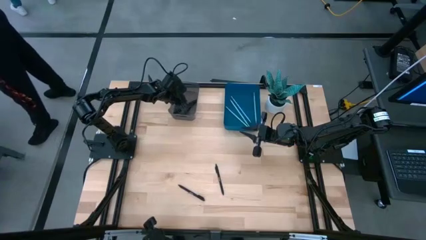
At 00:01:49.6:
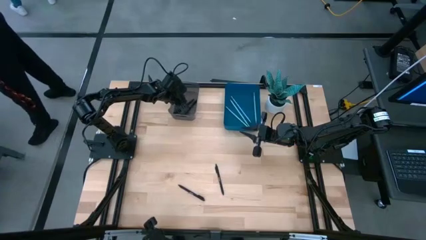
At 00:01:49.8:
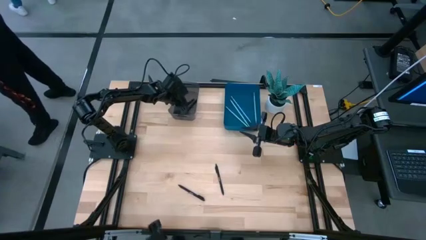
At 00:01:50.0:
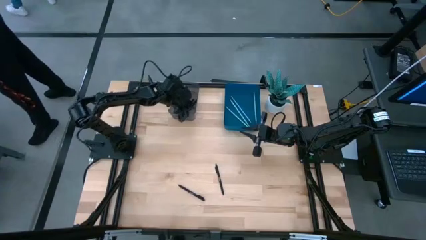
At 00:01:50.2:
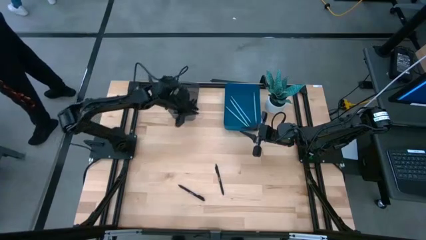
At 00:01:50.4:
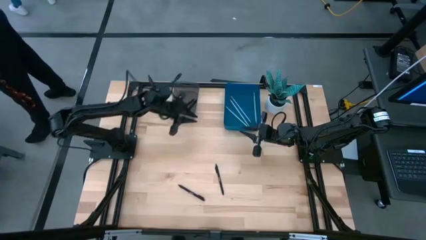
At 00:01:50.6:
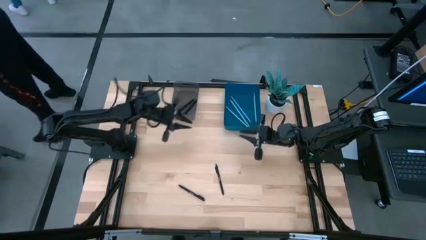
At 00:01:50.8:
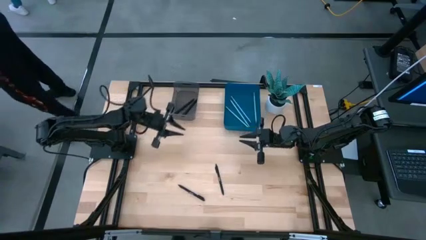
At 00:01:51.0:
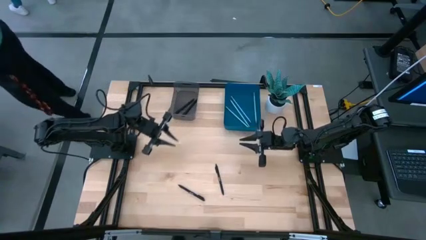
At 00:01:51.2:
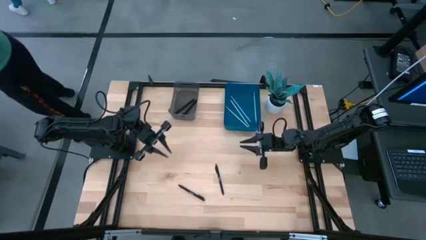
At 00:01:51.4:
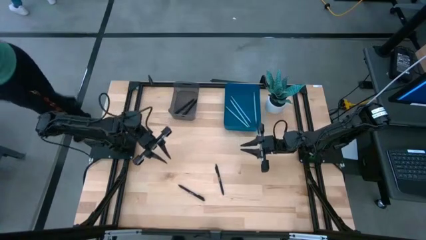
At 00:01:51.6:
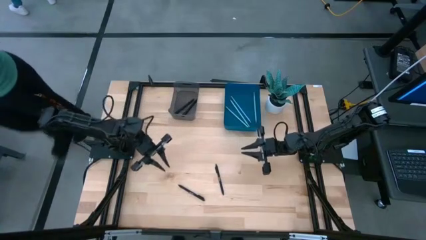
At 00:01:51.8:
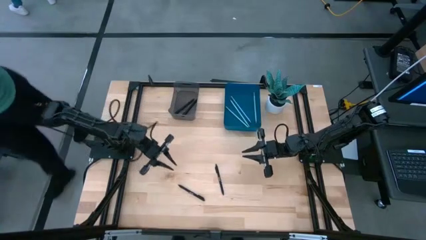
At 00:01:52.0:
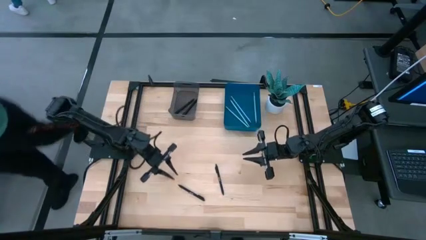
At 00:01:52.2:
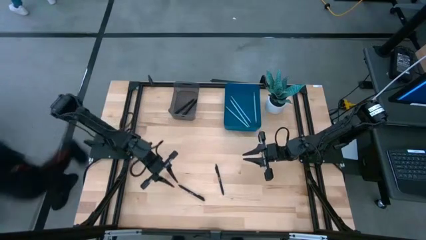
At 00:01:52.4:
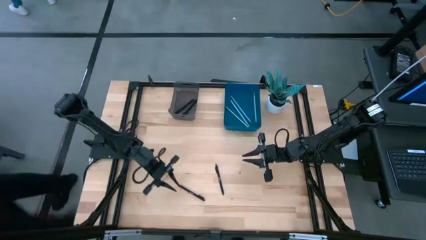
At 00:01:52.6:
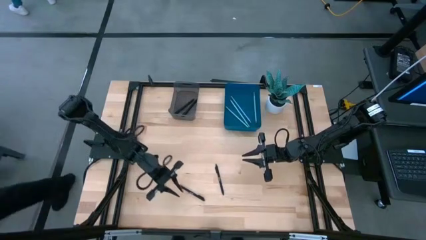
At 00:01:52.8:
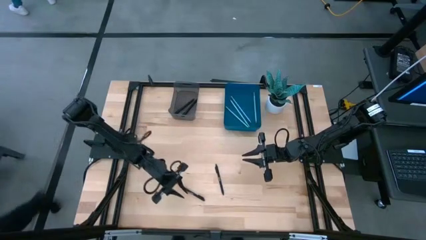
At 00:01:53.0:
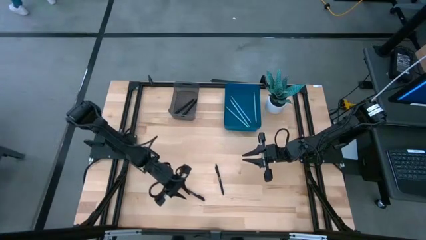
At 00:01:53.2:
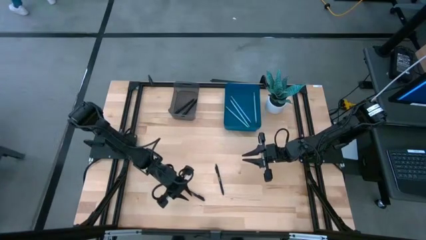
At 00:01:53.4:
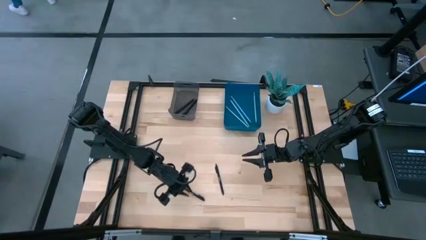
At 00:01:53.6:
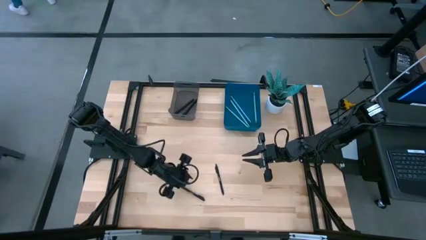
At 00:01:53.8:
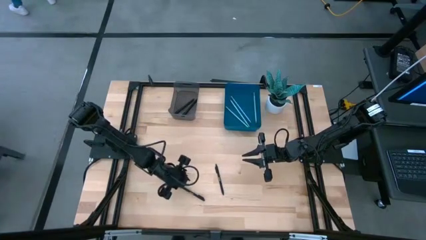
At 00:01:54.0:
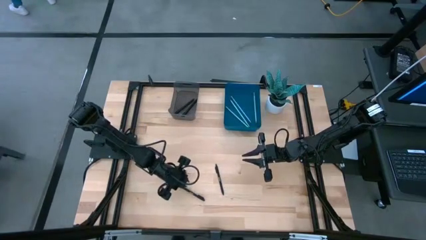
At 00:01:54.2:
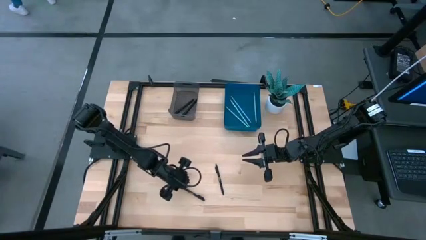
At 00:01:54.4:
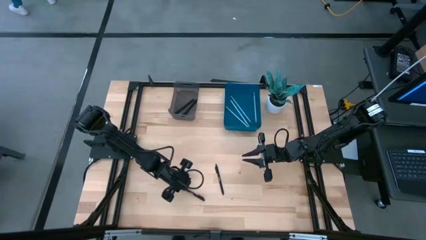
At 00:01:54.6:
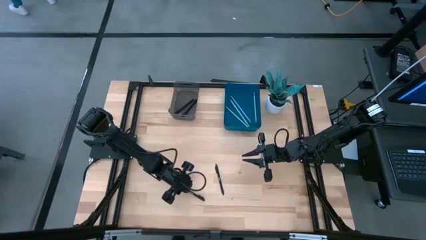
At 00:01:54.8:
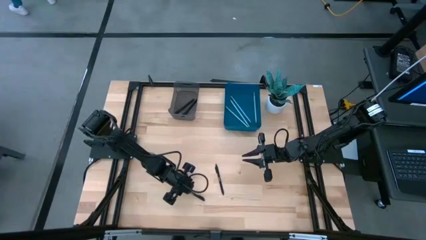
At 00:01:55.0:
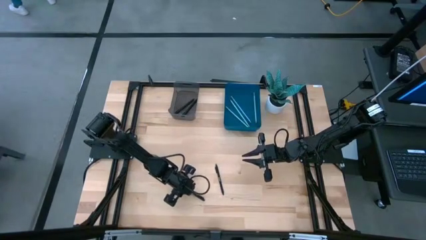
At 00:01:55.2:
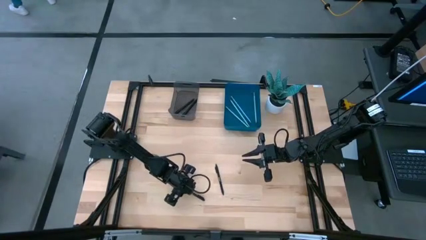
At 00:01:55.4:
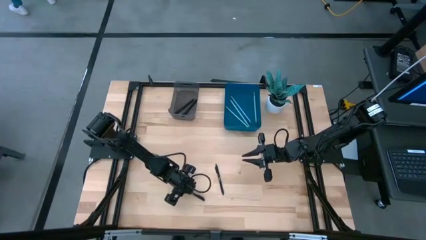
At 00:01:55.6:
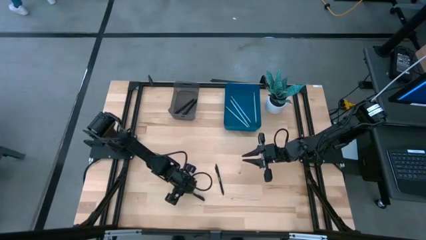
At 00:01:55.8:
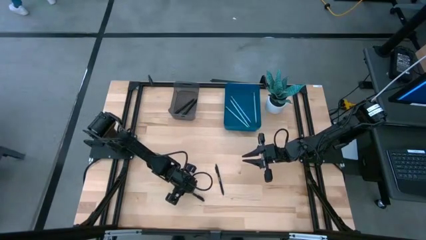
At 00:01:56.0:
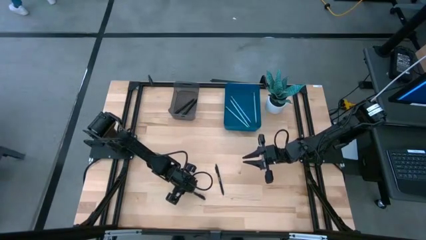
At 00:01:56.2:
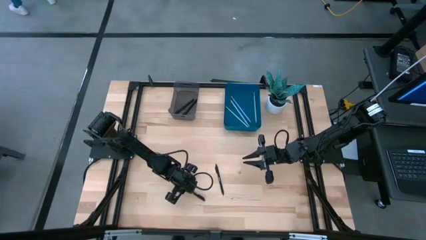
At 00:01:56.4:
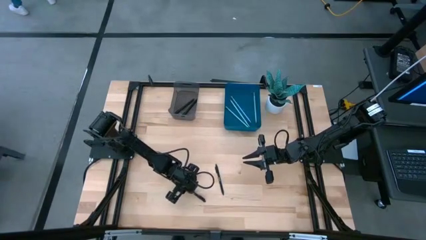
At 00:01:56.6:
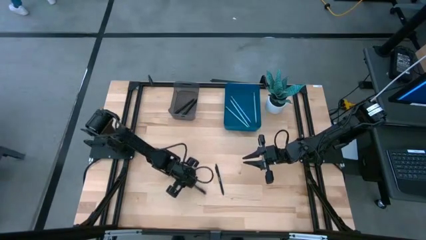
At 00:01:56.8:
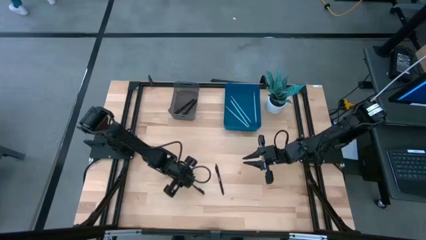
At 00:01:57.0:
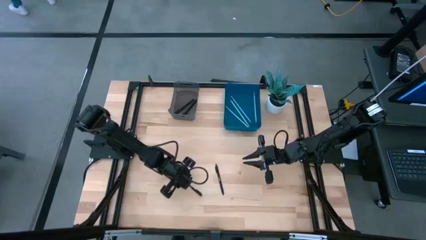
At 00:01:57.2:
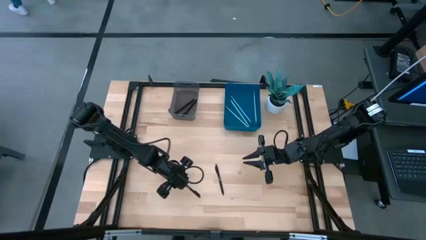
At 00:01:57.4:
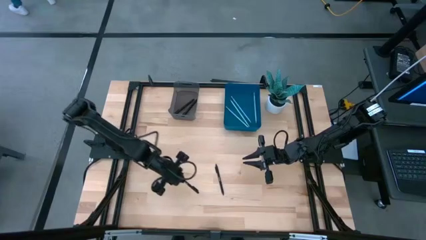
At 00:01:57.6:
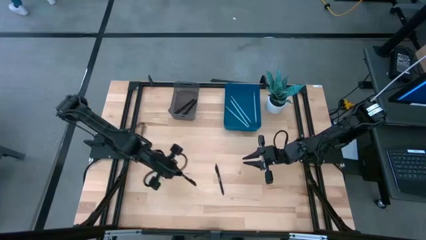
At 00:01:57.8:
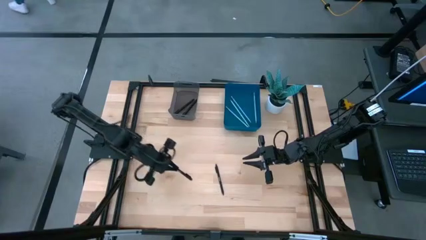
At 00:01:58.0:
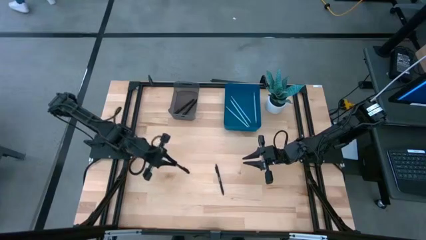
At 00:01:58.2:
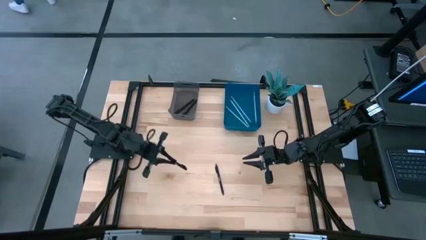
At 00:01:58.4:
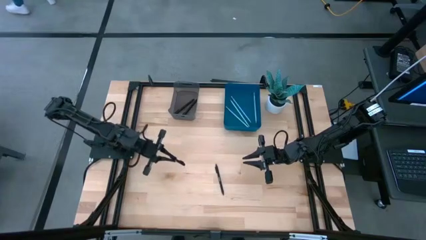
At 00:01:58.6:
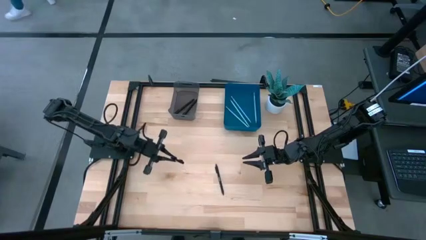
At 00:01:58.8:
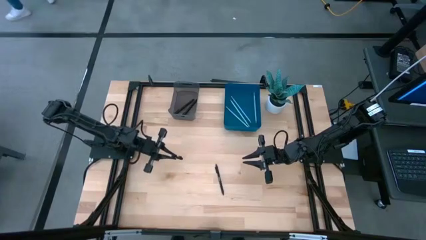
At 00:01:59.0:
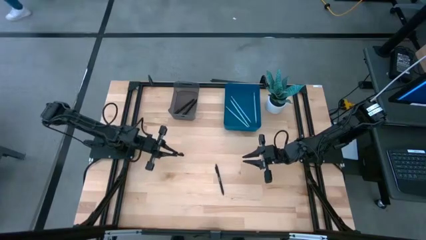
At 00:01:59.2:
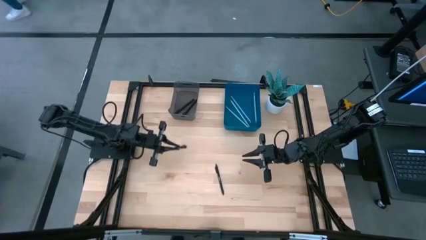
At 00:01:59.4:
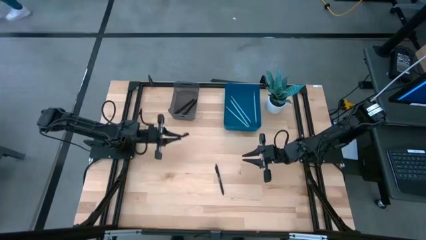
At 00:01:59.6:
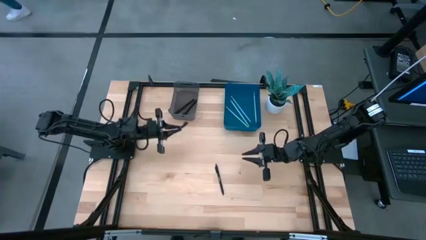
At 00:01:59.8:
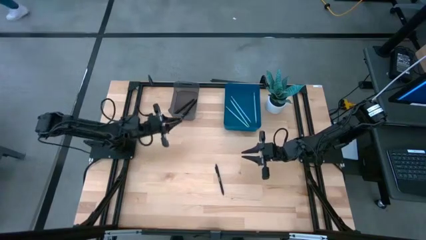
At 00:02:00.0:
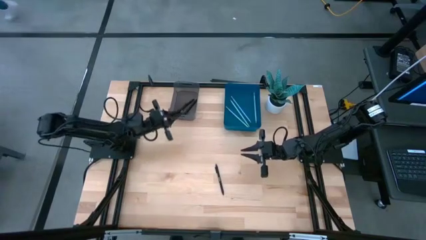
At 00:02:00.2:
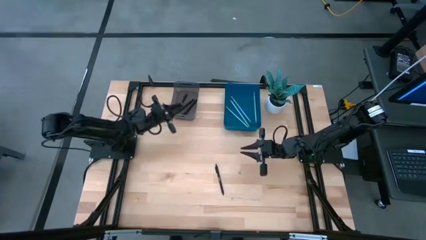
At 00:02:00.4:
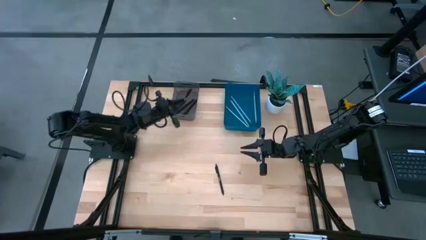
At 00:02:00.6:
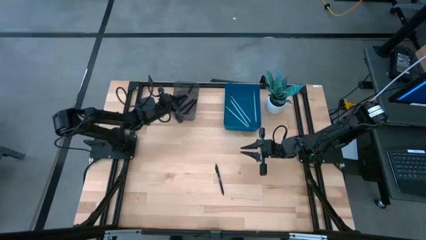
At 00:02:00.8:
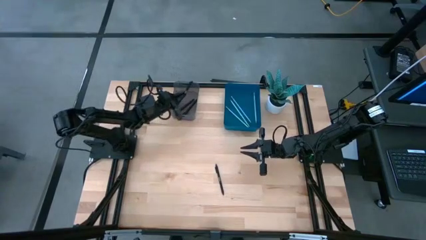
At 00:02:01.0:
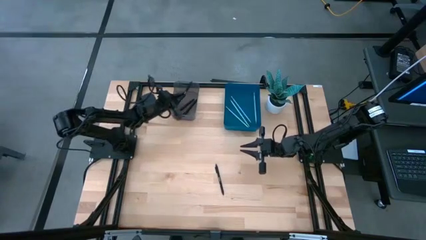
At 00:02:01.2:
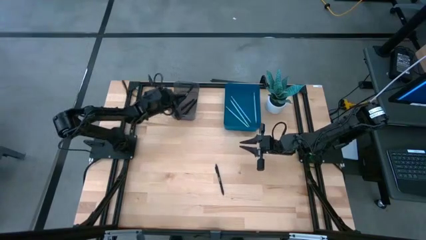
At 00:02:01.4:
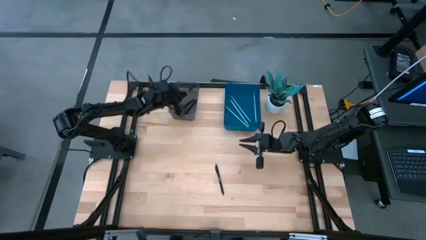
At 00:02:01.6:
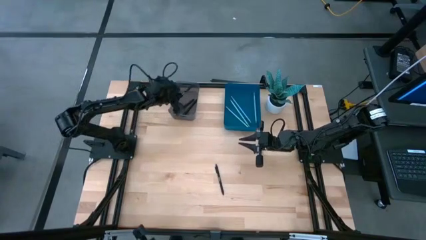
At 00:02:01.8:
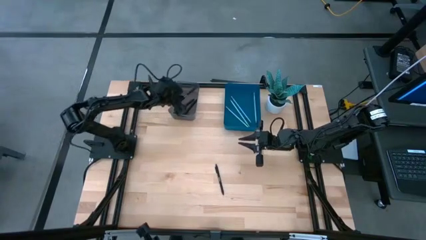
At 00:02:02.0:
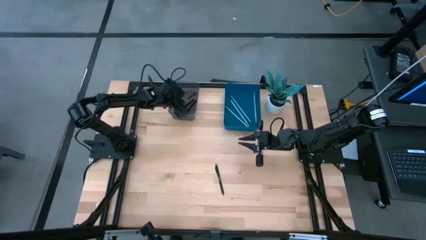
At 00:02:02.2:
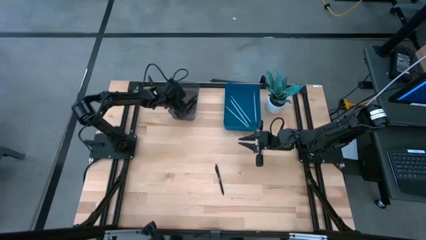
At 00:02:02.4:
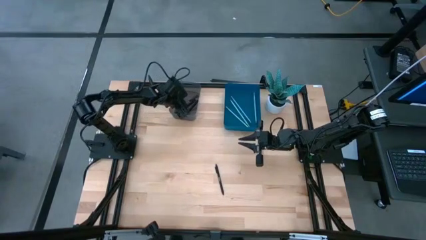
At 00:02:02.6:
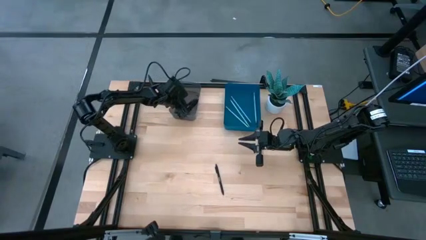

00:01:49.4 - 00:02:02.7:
Task: Sort pens & pencils
Put the black pen into the black bin

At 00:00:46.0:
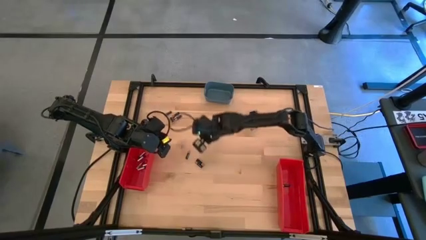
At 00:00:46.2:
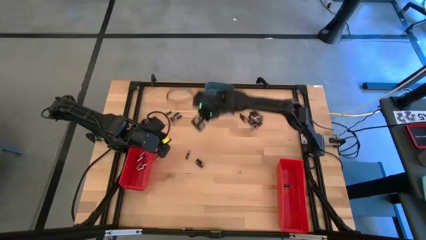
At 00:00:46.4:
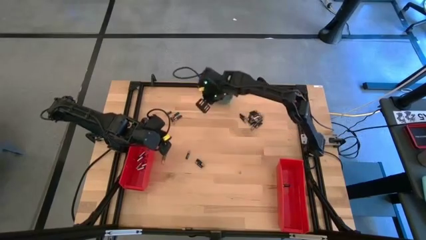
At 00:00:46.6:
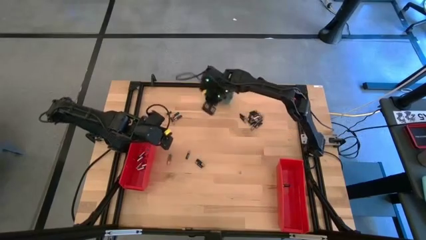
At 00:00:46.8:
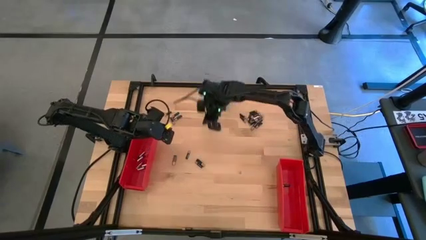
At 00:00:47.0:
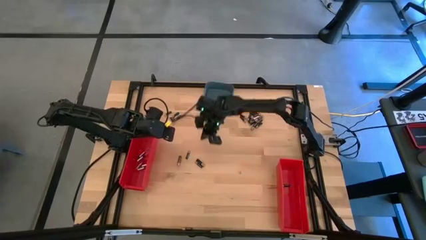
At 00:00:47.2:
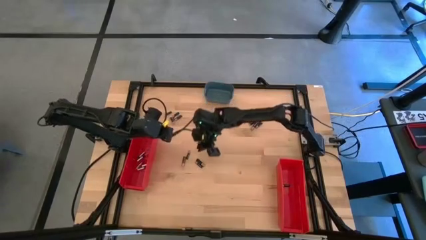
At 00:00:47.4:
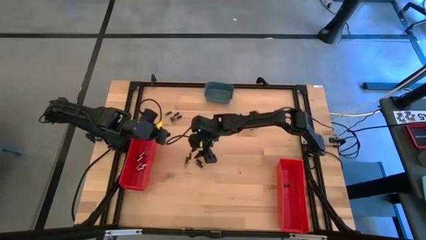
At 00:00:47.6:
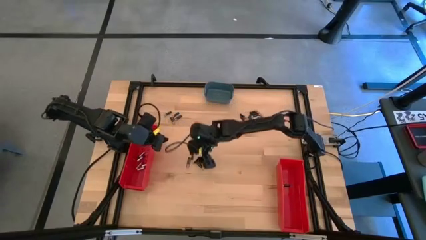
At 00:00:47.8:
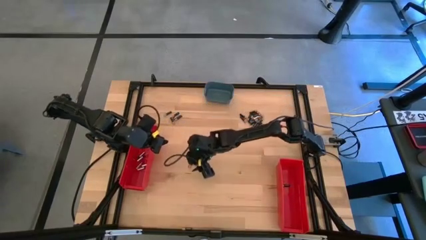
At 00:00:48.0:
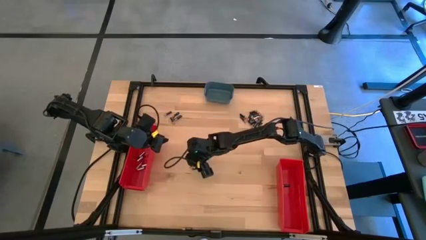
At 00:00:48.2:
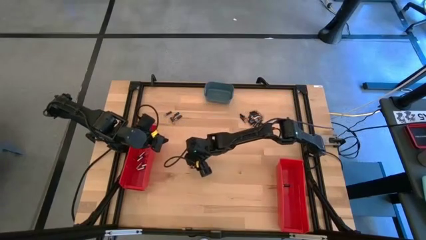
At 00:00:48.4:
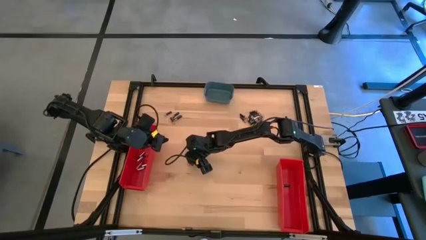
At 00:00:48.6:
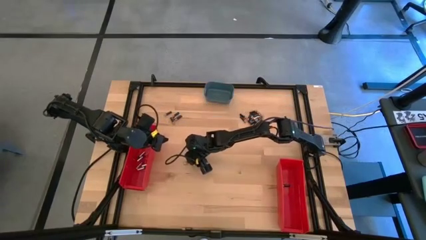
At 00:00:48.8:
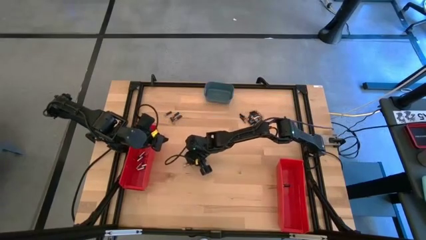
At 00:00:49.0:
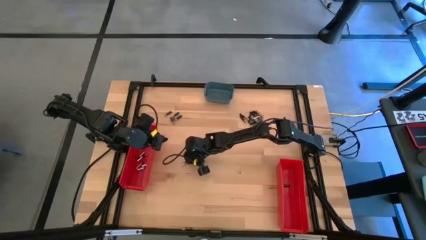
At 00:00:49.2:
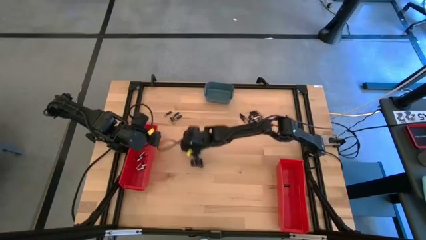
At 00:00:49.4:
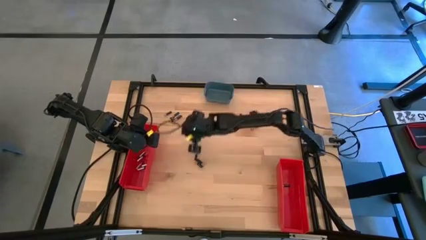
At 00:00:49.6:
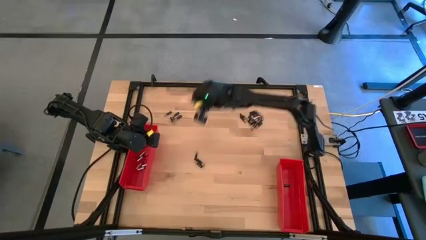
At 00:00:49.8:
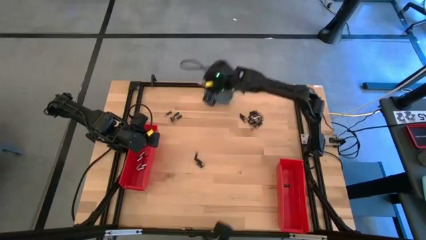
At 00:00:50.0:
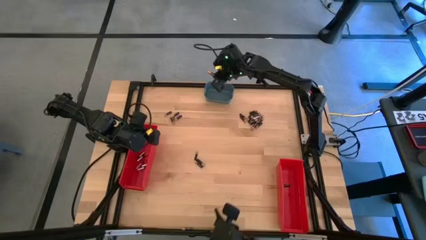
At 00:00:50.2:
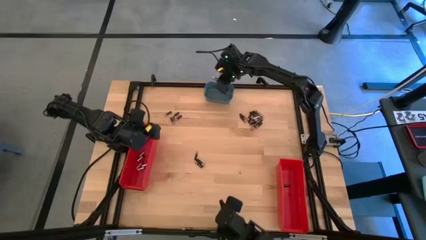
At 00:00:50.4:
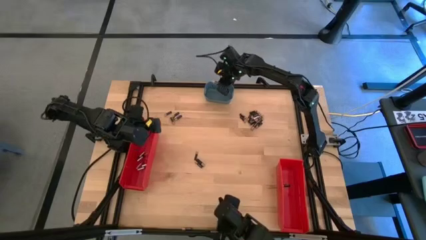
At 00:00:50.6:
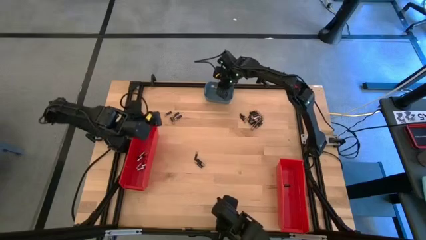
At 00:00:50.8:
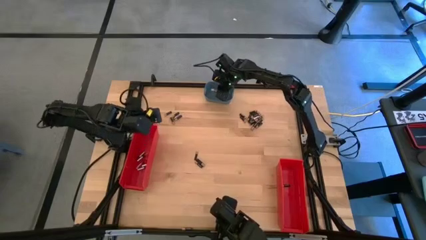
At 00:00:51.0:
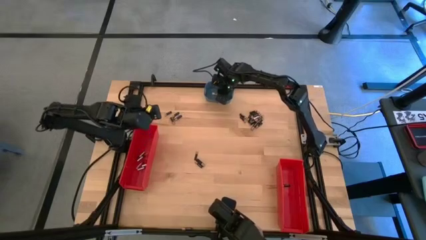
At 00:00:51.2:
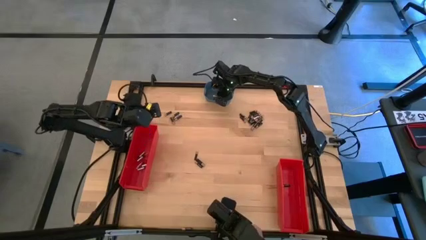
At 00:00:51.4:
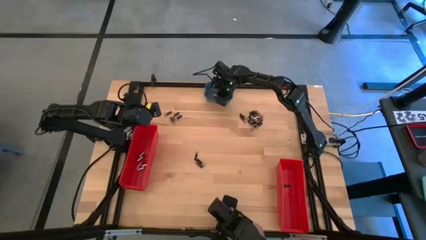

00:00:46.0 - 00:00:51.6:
Task: Sort batteries
Put the big brown battery into the blue bin
